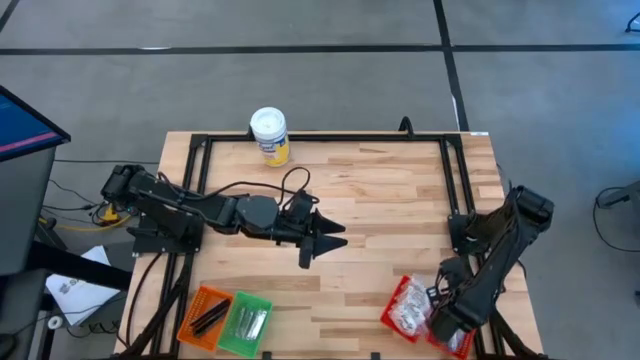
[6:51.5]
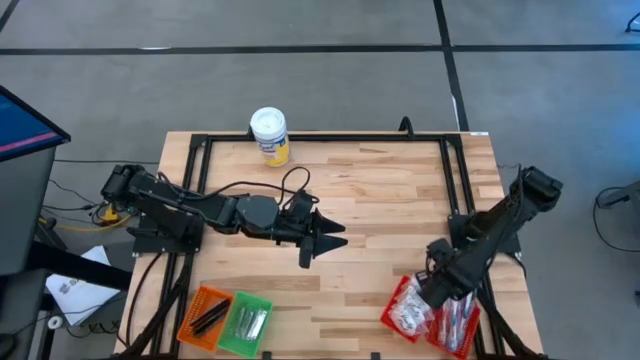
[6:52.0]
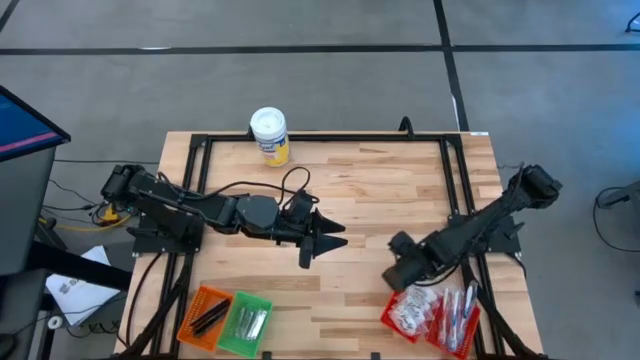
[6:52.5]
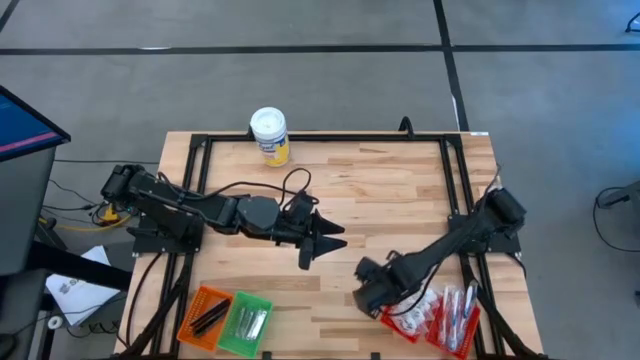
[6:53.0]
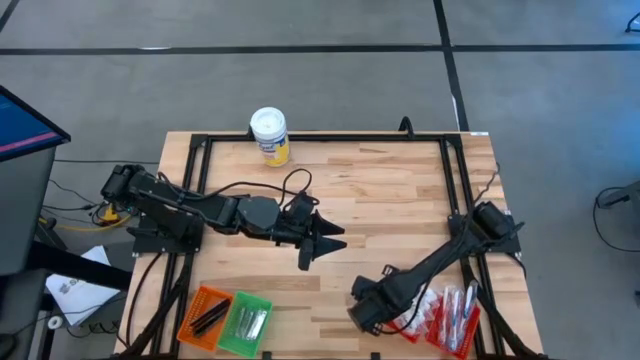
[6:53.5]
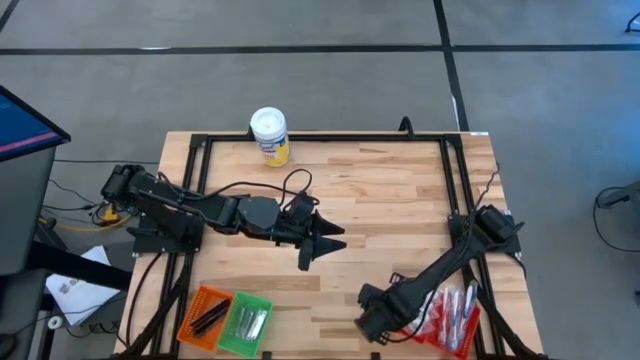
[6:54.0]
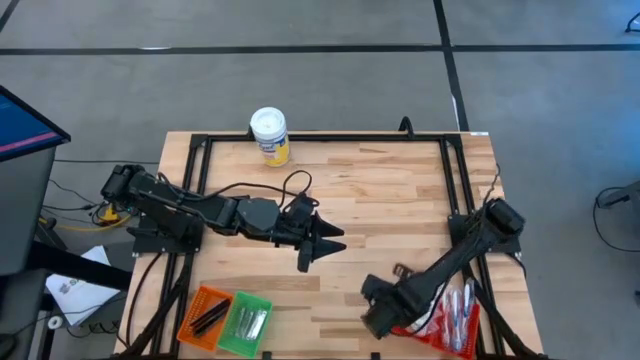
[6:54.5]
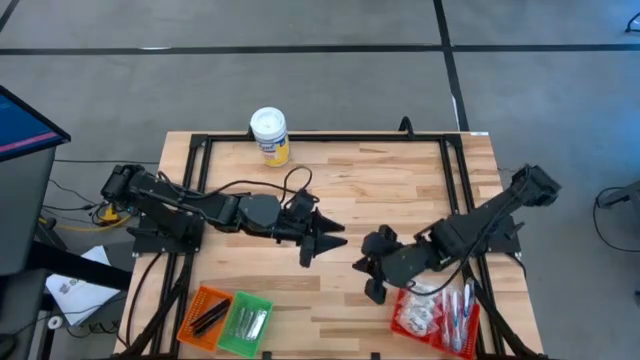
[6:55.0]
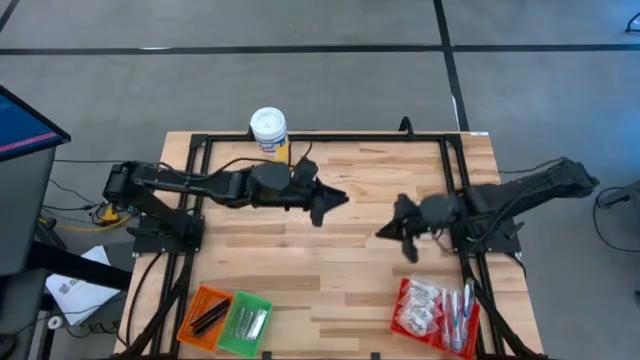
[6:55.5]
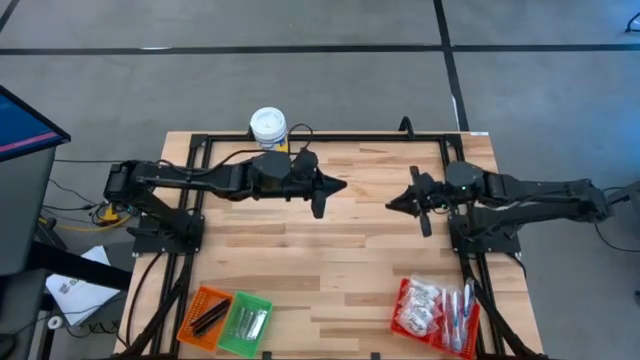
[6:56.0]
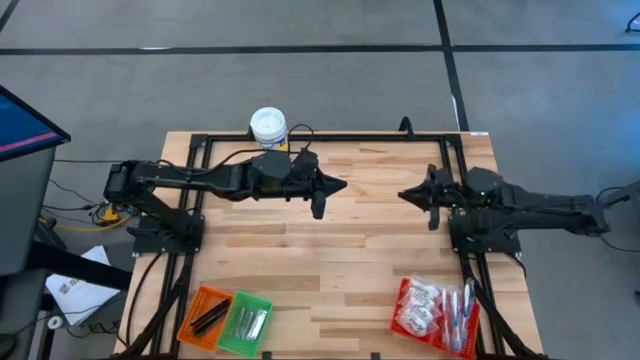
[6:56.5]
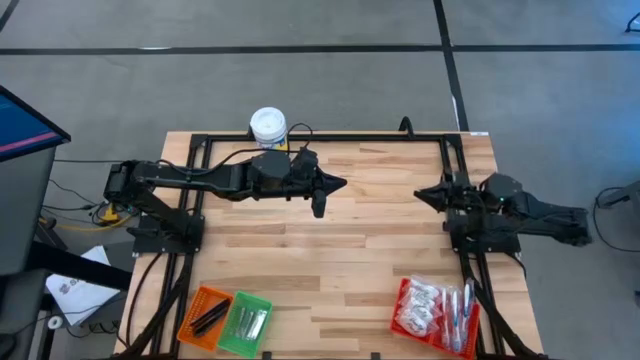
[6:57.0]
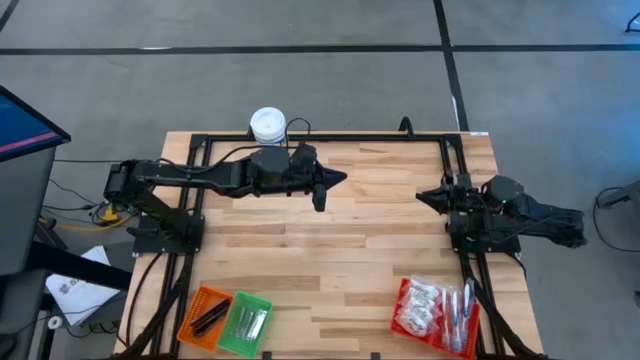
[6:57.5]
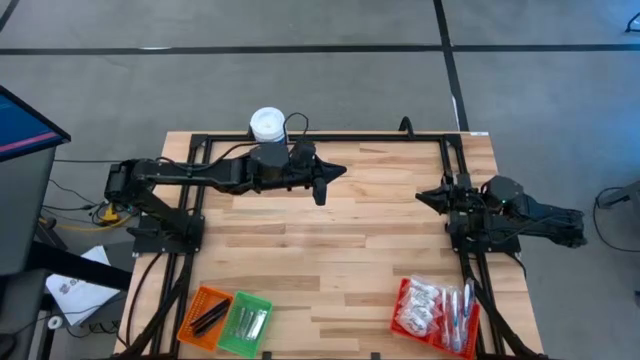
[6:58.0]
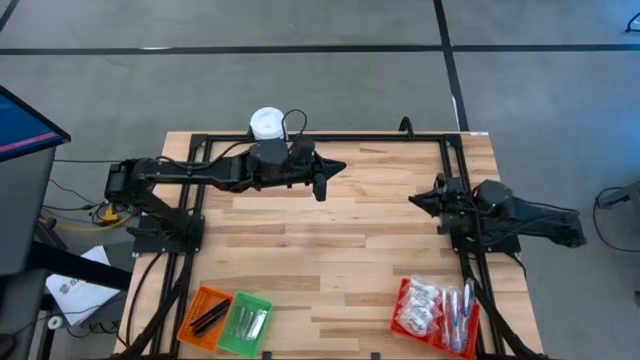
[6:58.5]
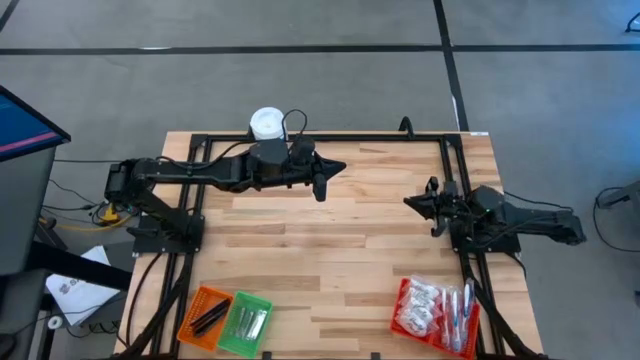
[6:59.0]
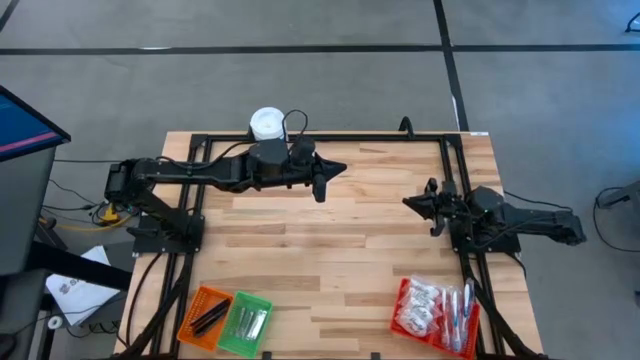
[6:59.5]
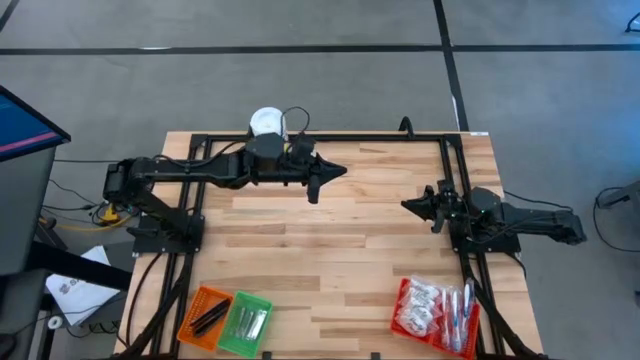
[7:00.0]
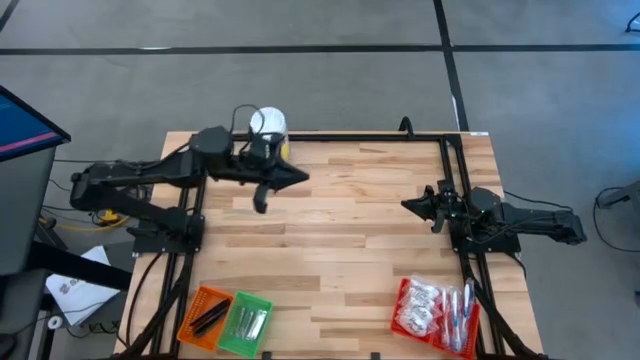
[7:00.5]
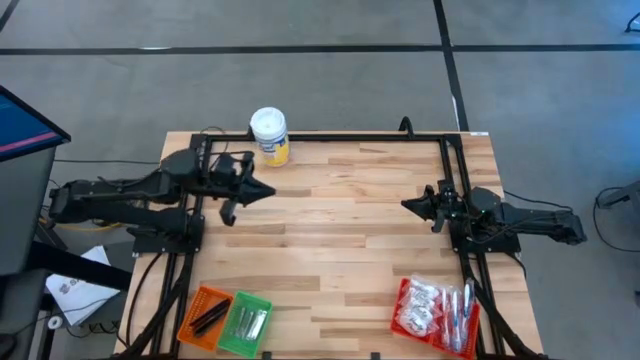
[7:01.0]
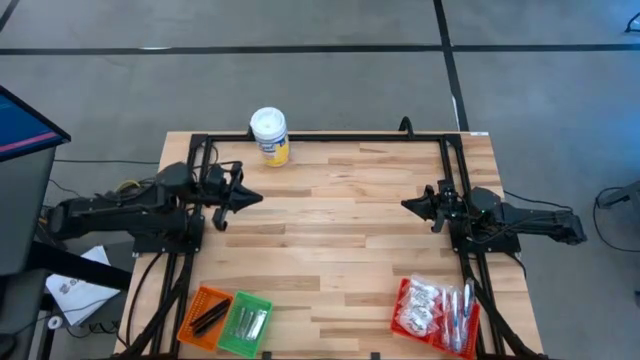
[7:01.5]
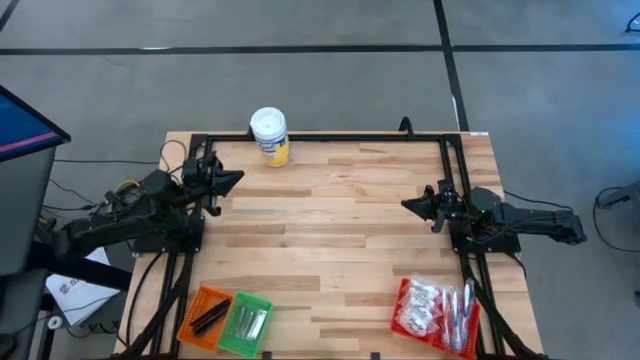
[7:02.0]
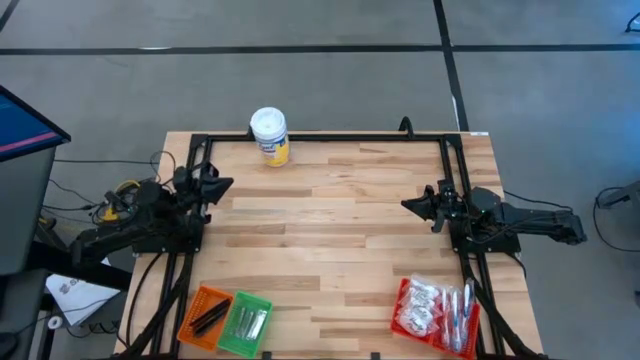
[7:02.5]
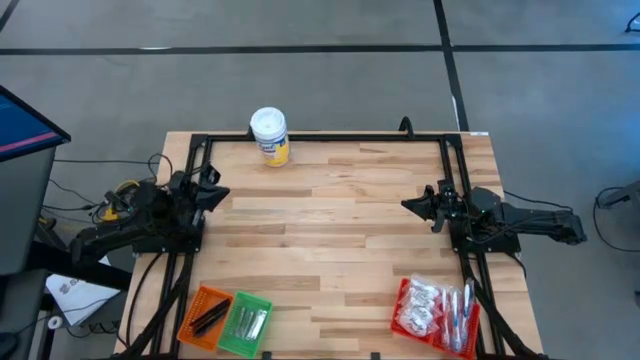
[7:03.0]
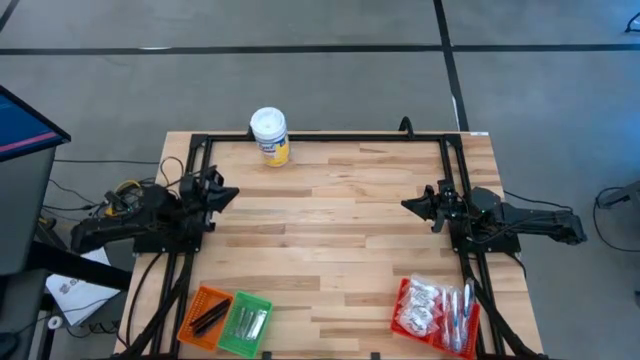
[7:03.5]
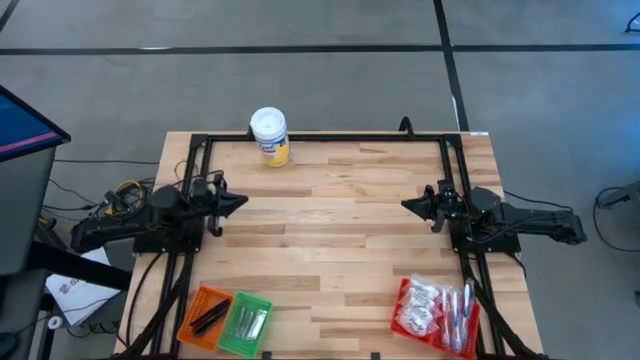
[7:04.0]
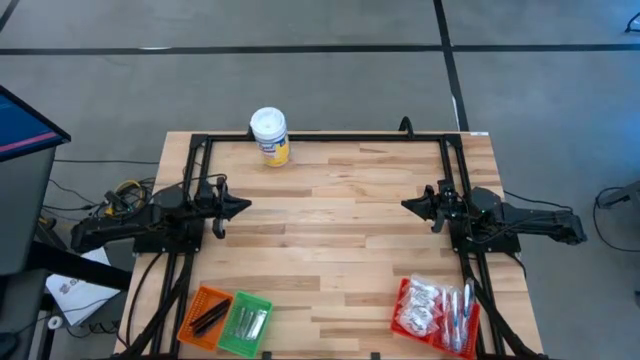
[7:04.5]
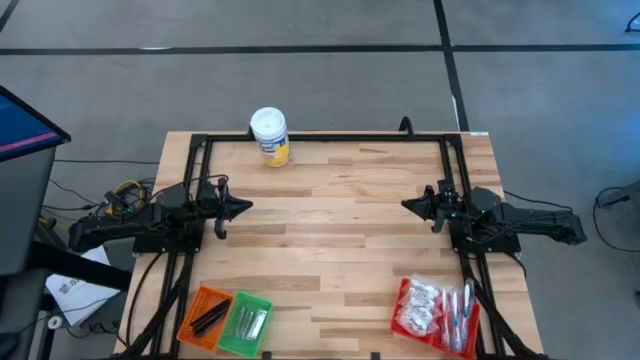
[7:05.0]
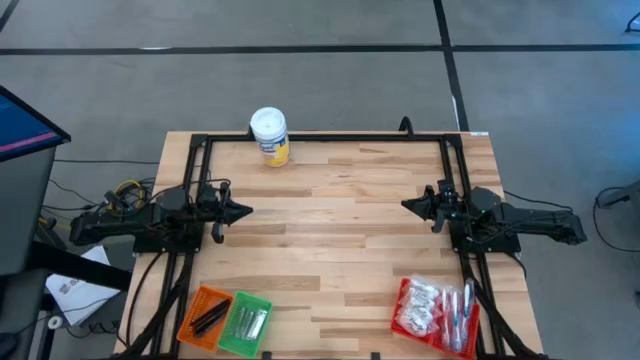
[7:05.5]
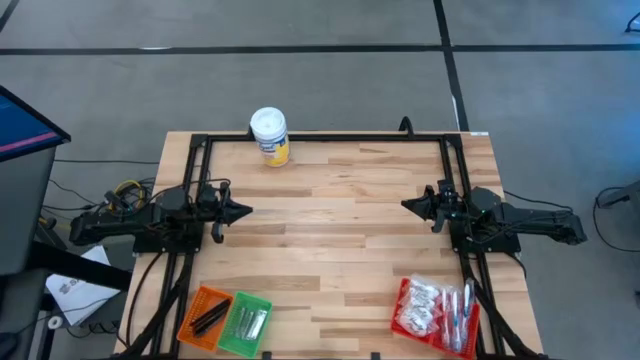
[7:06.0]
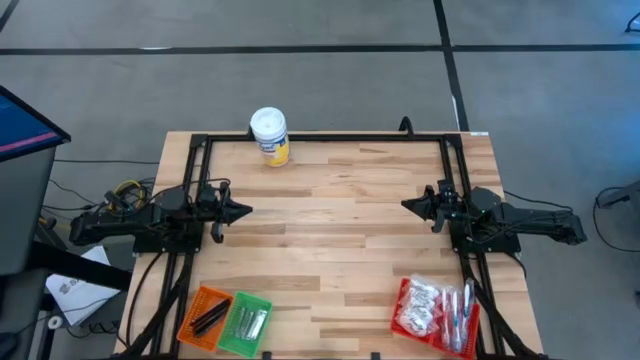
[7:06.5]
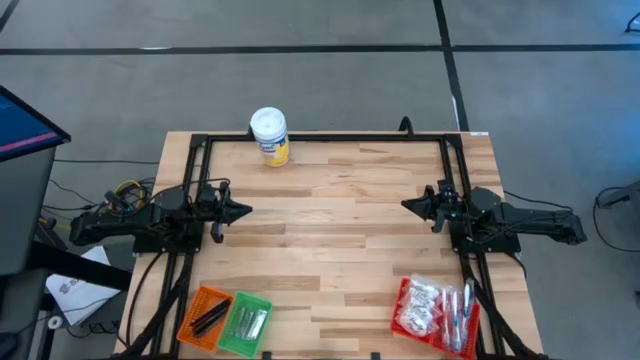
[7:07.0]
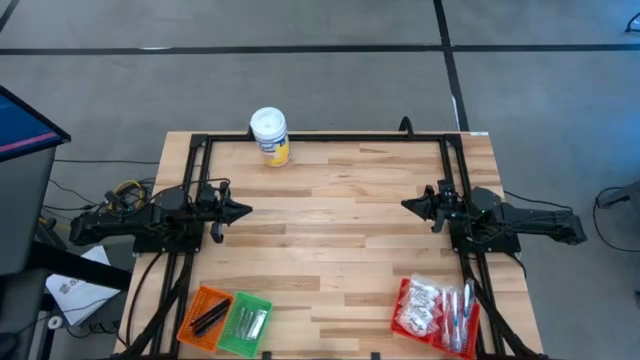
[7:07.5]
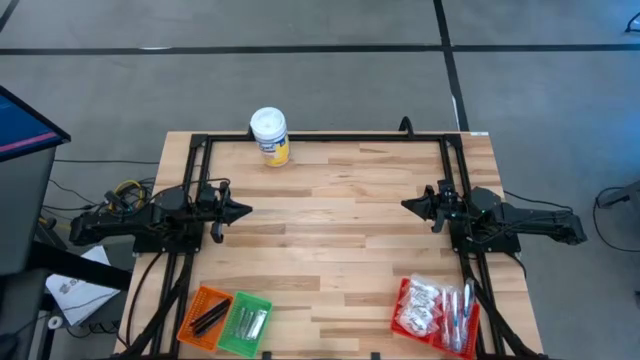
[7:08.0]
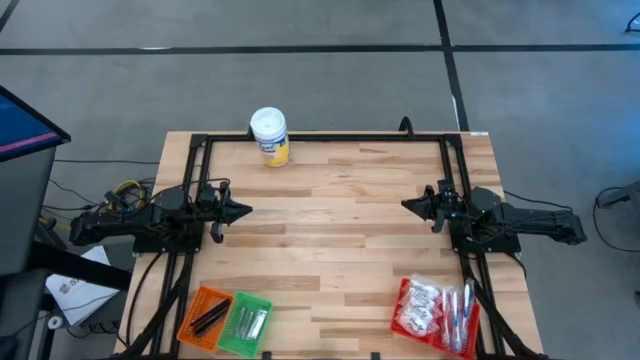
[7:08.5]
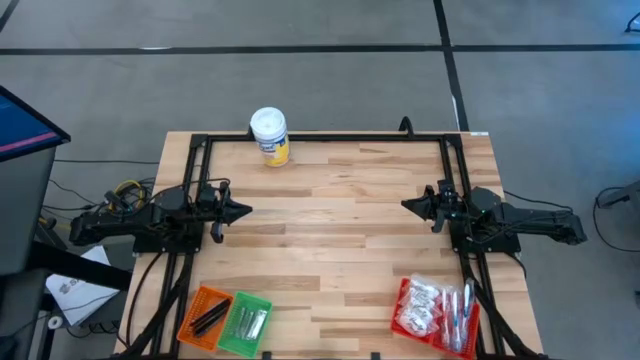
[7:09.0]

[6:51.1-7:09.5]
Task: Pick & Place Travel size toiletries
Return to Home Position
